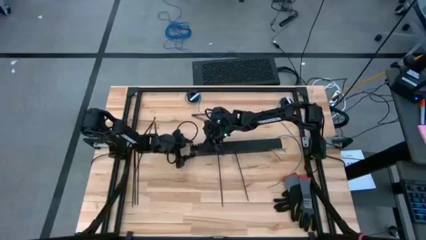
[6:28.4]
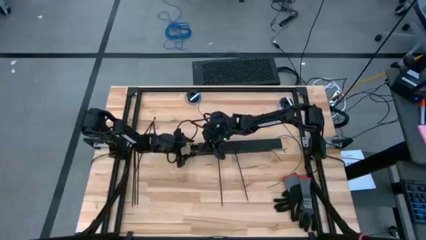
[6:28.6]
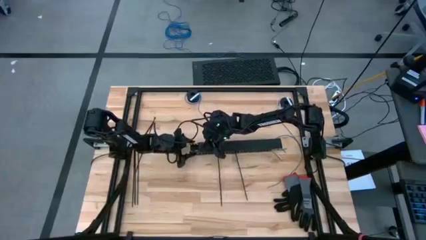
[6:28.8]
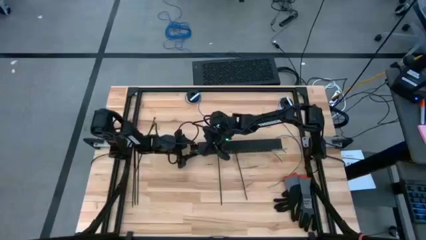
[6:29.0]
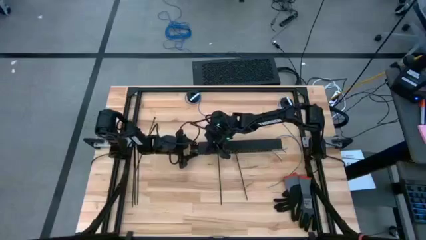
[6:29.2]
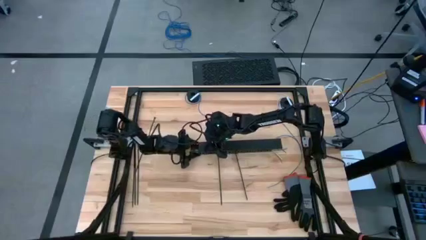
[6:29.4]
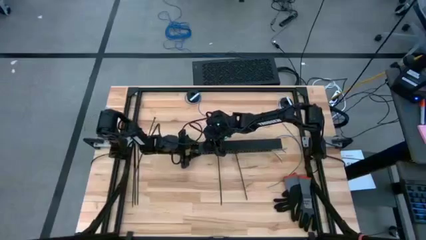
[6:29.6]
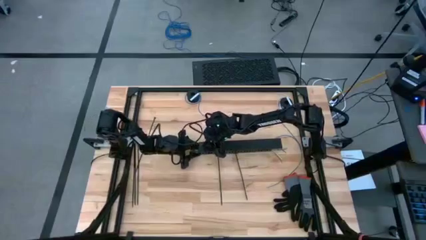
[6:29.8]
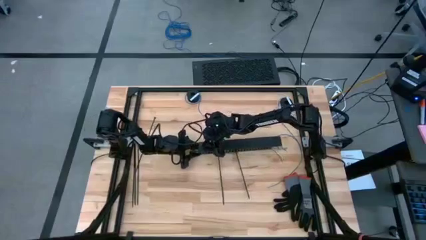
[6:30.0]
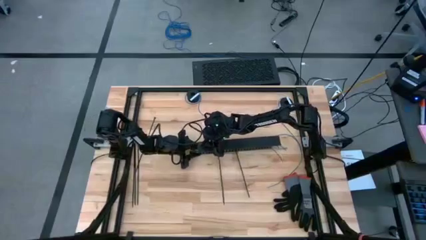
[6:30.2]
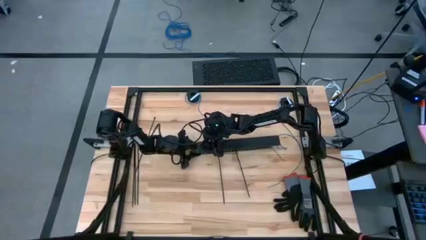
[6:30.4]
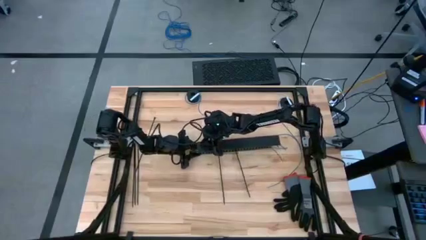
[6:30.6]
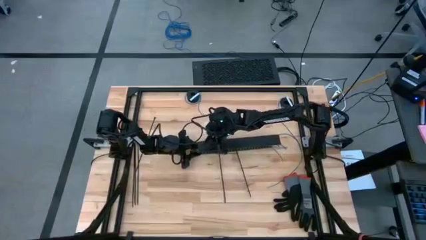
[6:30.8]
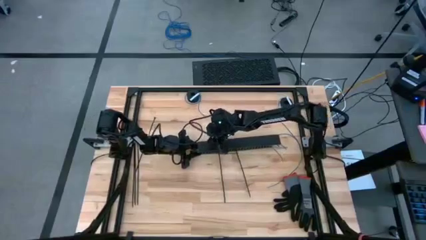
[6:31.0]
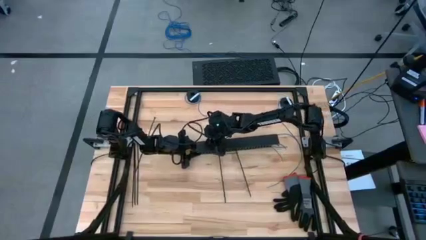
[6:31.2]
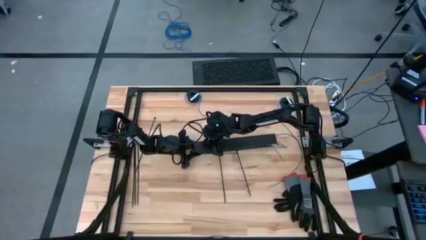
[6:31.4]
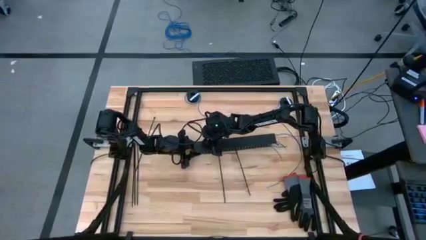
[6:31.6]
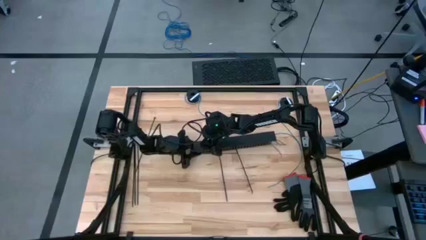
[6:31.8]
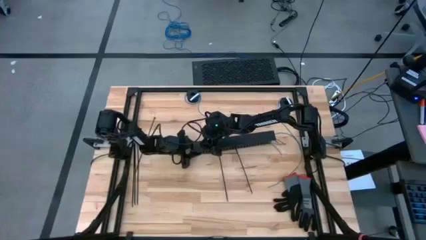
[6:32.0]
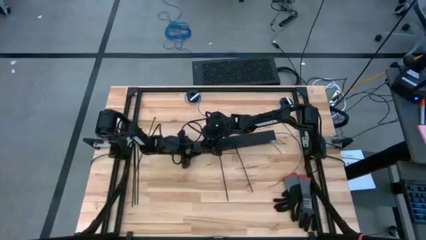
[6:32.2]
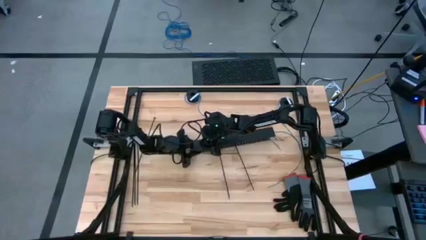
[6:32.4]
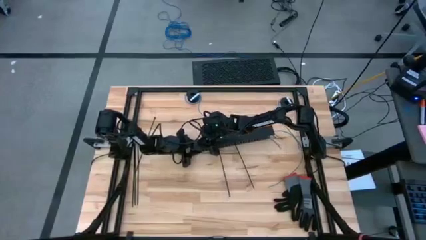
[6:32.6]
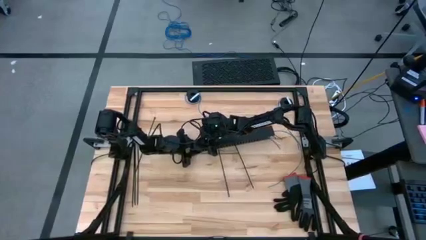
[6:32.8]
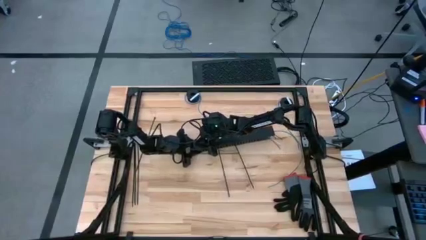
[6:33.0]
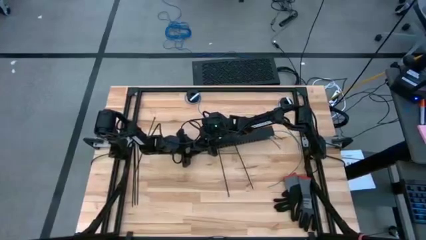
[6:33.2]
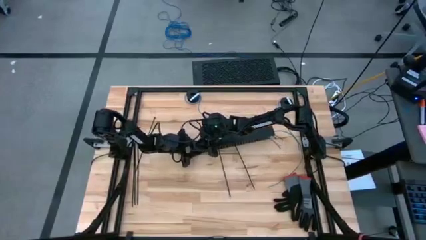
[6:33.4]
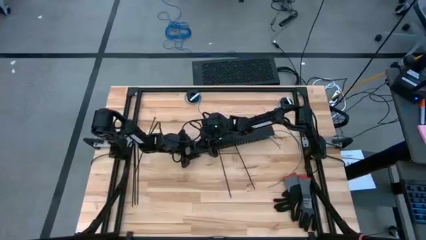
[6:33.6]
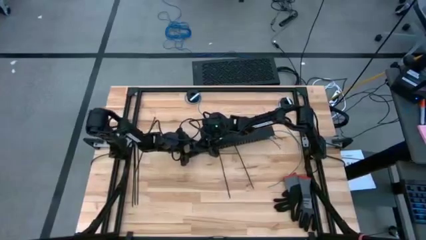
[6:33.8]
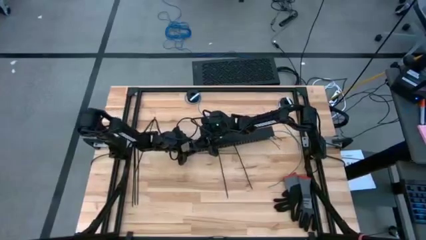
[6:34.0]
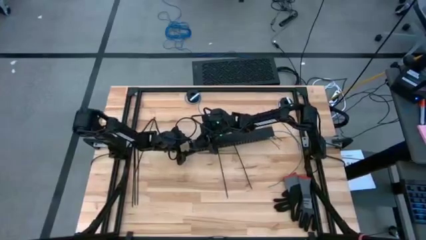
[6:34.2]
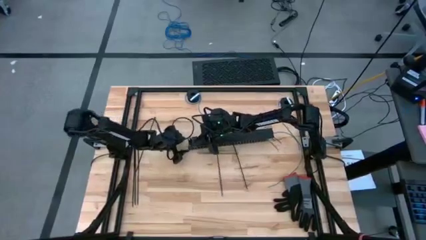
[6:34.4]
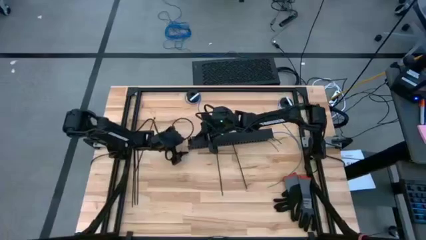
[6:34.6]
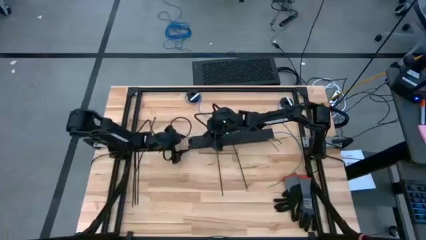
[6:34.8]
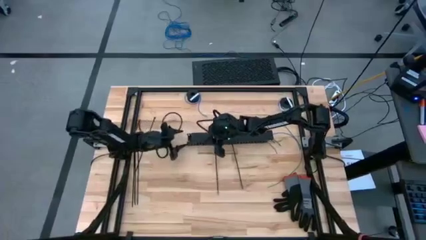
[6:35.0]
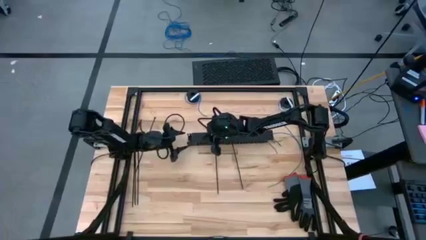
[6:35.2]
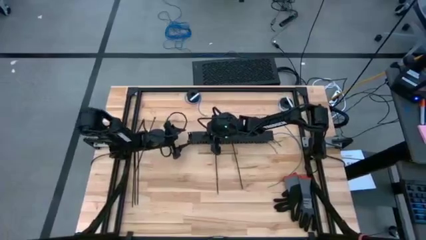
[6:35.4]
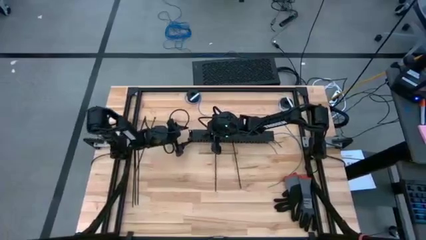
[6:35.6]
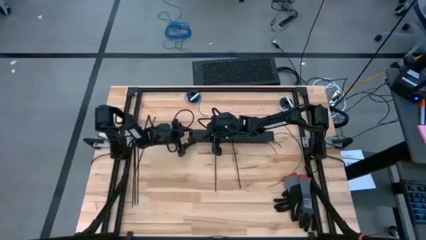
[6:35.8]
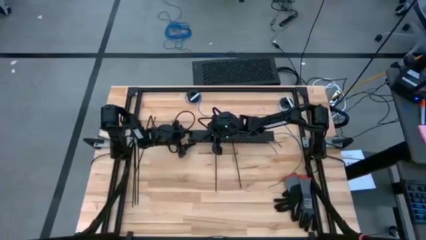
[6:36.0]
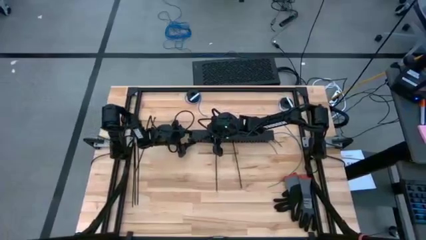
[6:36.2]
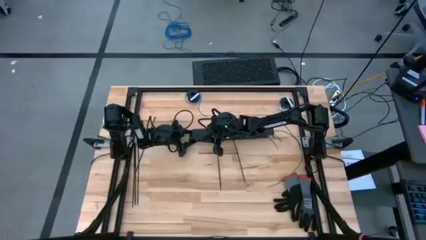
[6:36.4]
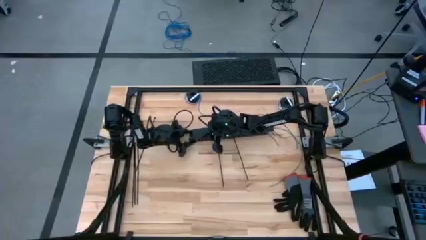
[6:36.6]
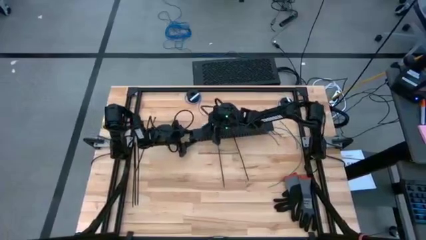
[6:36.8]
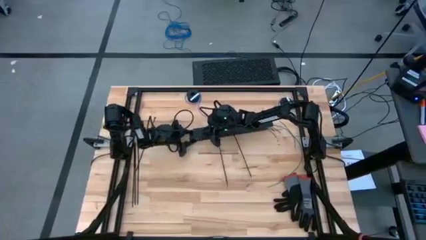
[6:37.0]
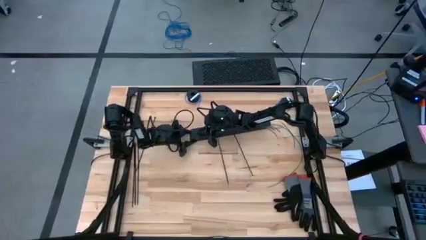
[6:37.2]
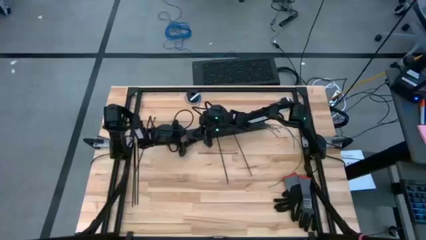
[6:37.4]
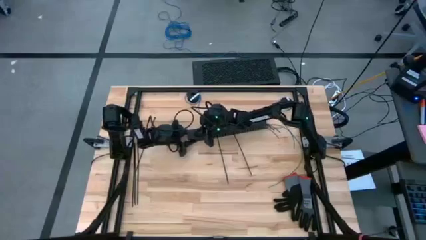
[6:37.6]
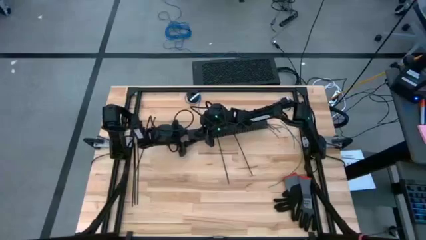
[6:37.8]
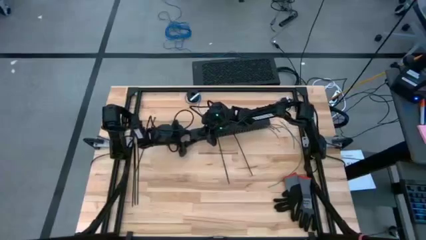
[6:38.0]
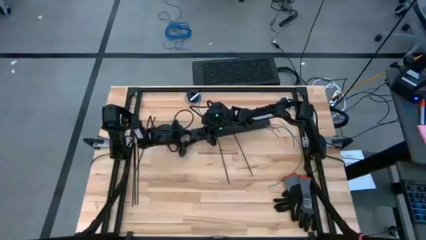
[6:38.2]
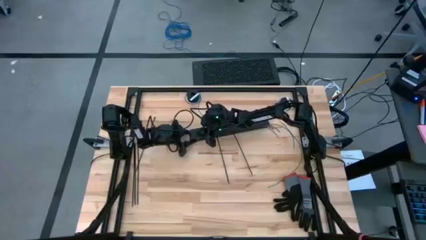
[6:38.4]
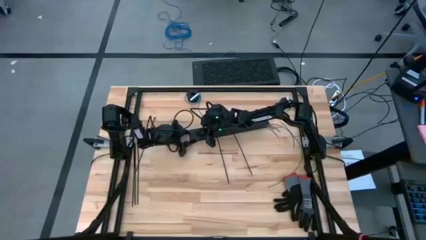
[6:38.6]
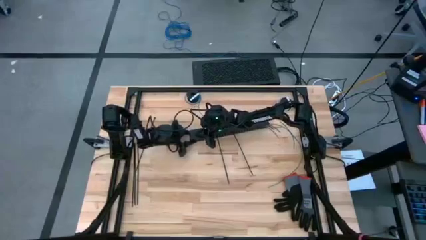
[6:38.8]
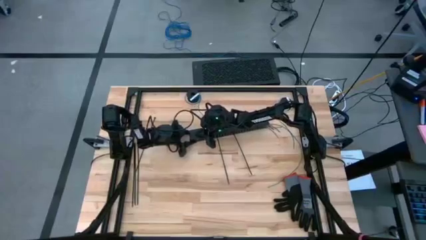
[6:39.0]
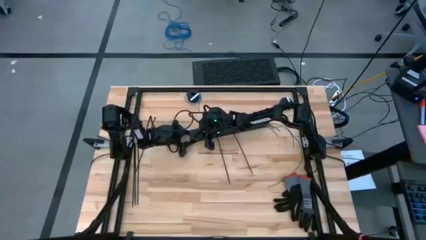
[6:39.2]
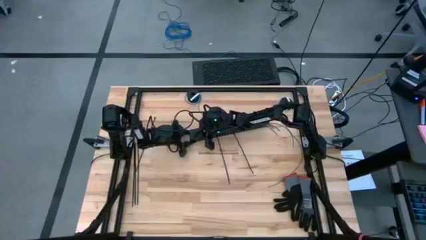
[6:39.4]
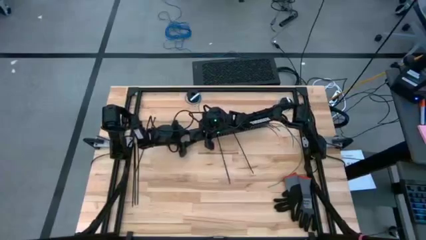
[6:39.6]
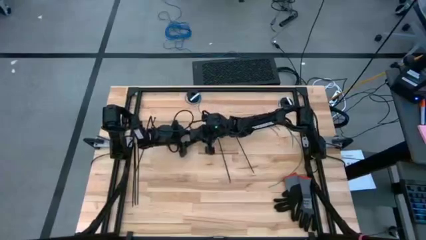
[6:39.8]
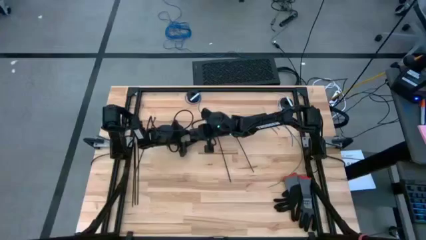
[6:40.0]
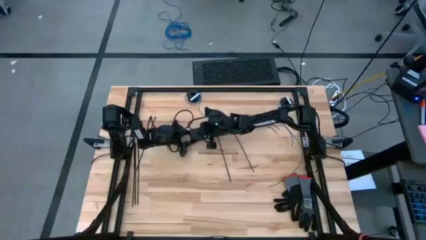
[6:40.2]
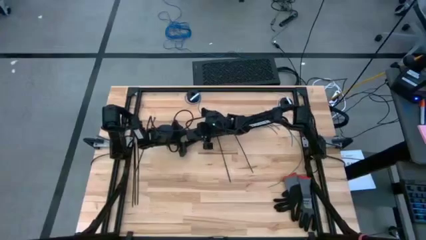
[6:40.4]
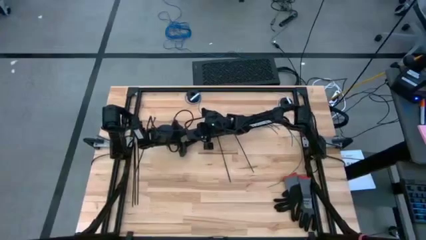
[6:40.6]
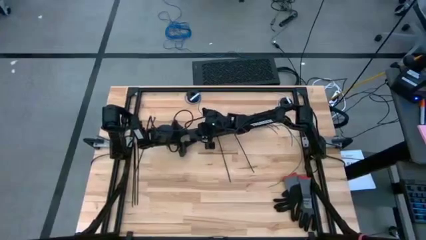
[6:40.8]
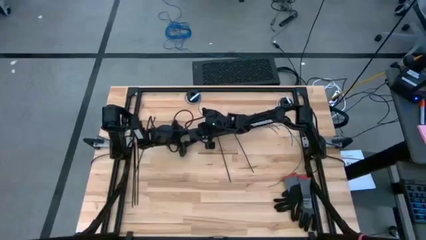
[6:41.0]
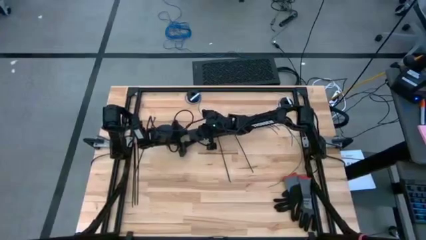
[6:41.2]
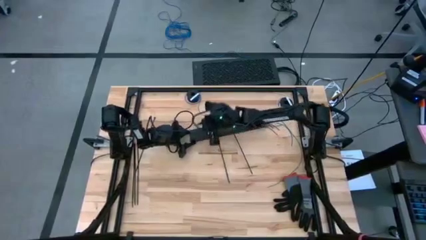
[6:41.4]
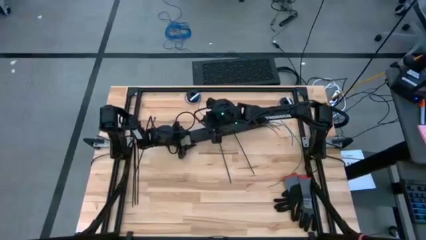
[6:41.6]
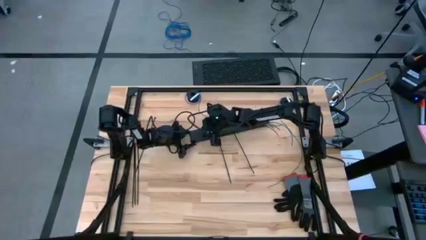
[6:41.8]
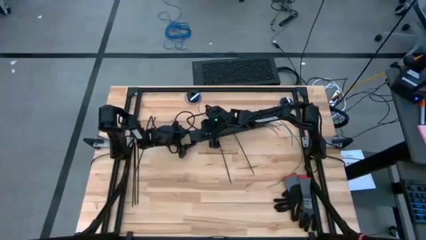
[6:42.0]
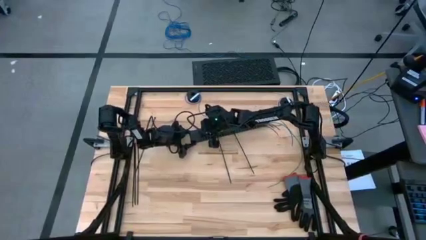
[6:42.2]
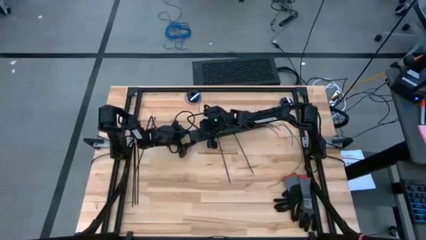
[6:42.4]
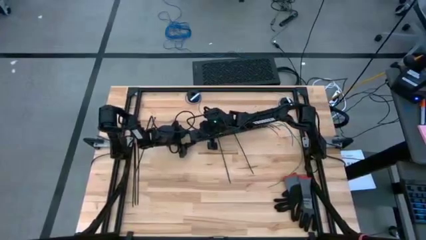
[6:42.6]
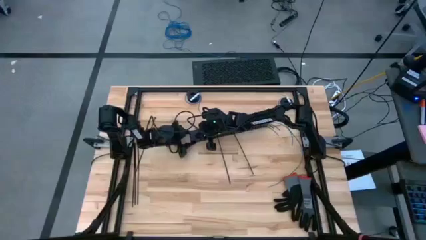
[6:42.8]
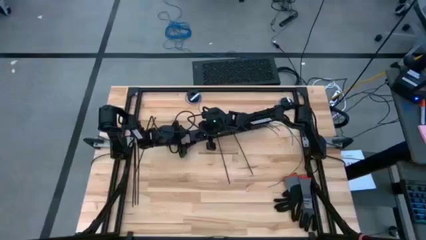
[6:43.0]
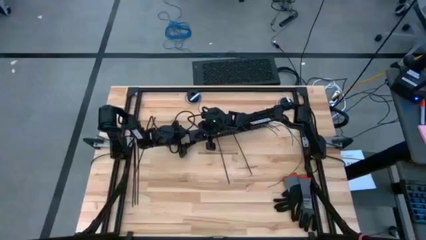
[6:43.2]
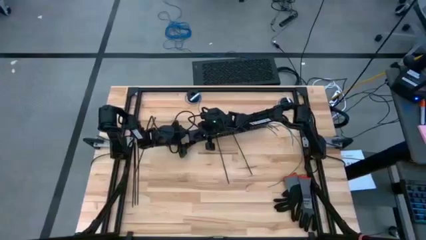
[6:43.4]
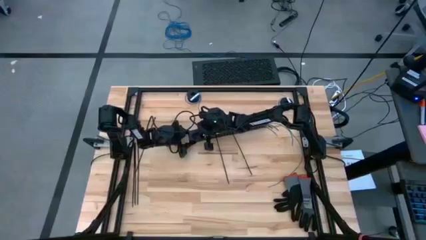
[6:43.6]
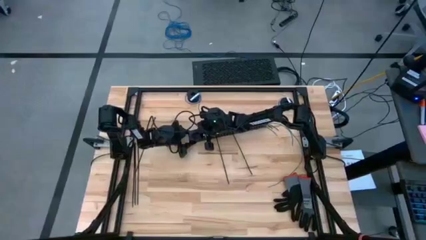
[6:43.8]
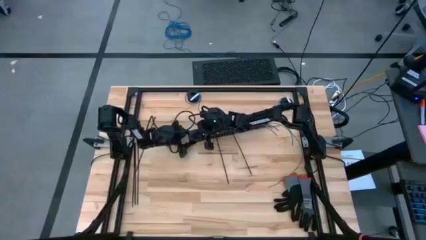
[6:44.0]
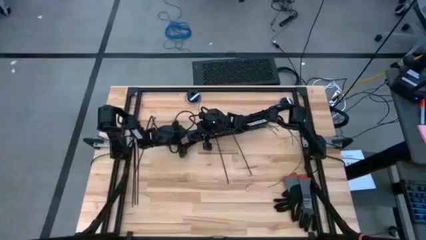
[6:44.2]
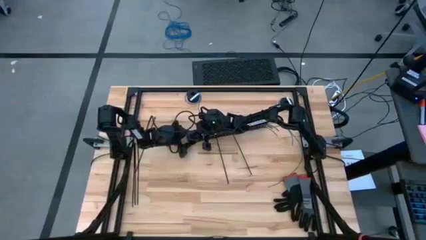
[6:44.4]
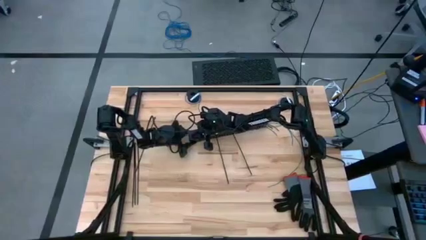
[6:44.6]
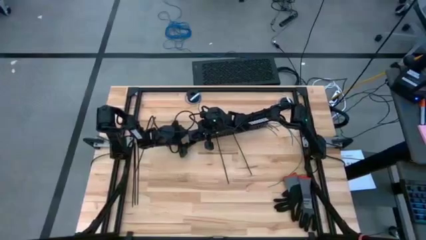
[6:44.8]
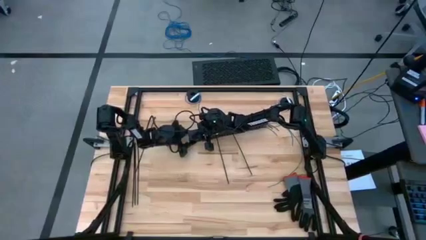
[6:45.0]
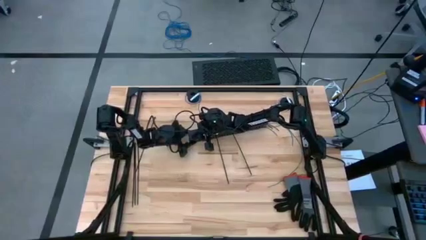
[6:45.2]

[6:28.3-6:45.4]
Task: Ziptie cables
Close the black cable duct
